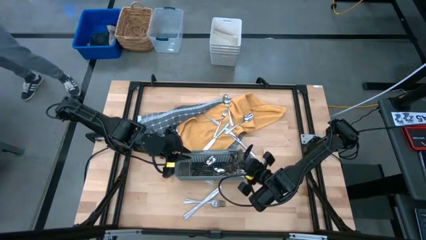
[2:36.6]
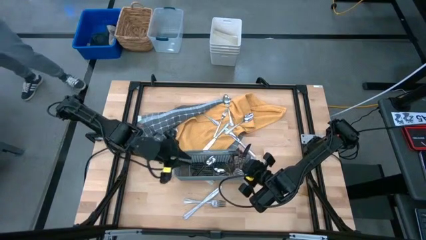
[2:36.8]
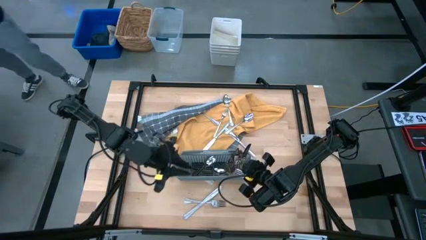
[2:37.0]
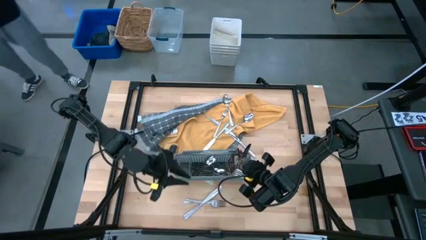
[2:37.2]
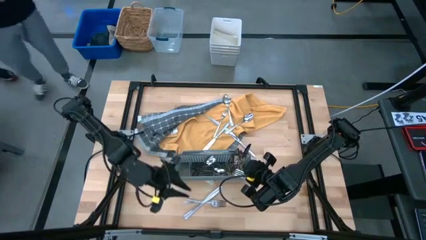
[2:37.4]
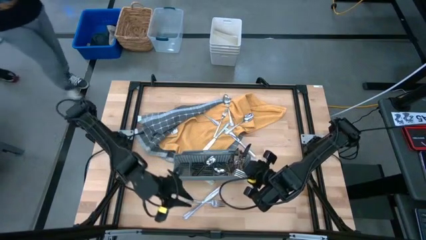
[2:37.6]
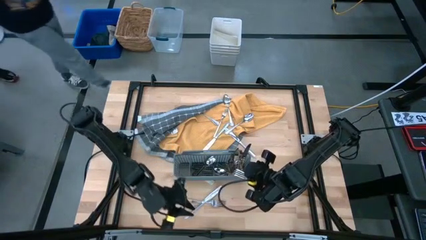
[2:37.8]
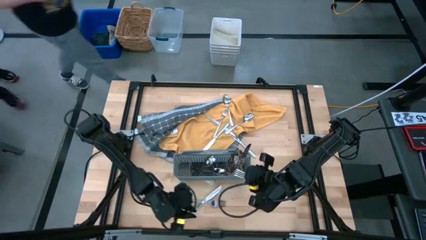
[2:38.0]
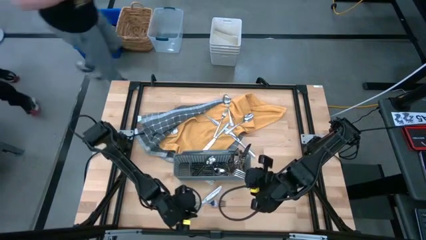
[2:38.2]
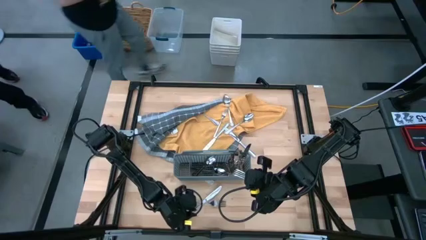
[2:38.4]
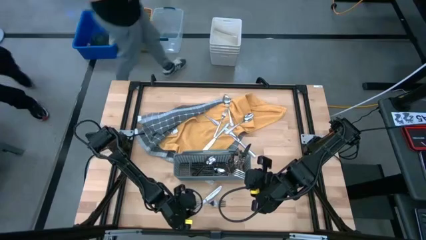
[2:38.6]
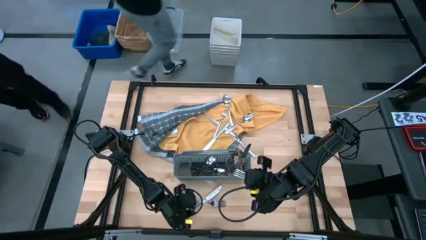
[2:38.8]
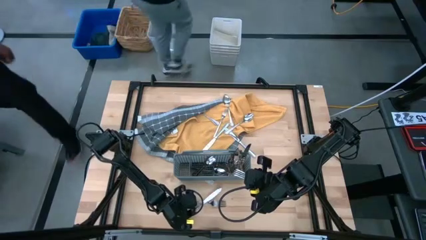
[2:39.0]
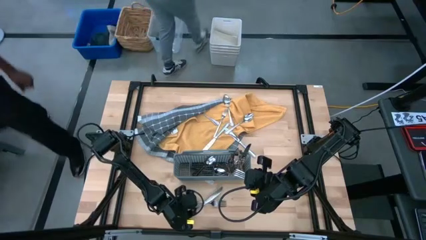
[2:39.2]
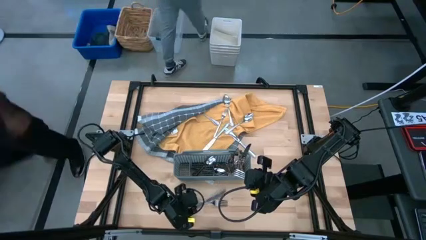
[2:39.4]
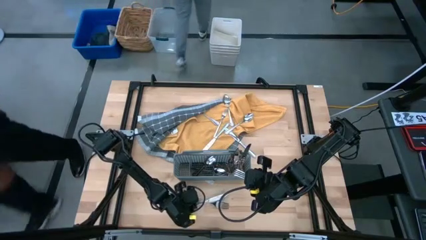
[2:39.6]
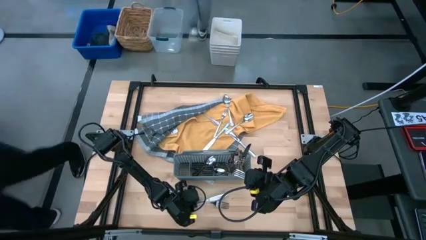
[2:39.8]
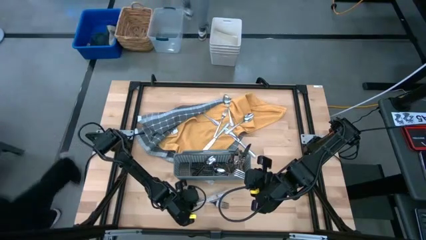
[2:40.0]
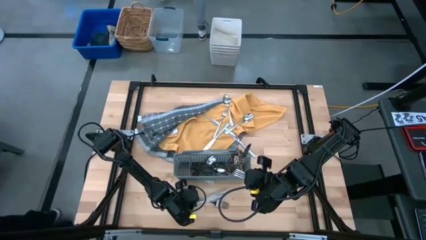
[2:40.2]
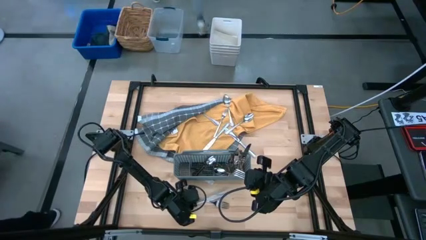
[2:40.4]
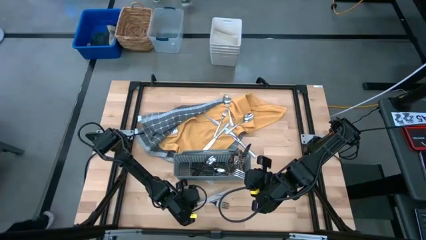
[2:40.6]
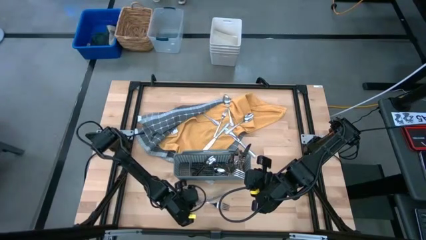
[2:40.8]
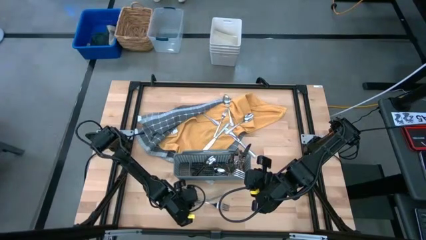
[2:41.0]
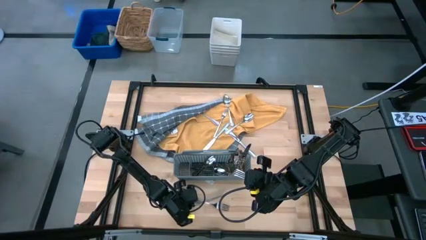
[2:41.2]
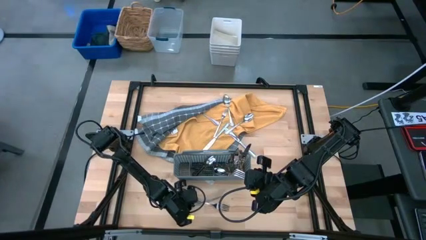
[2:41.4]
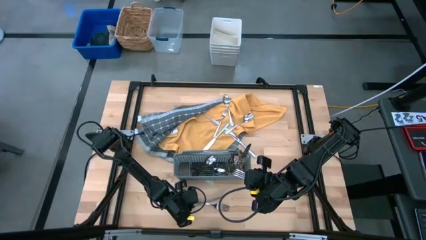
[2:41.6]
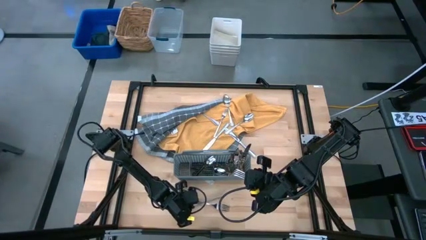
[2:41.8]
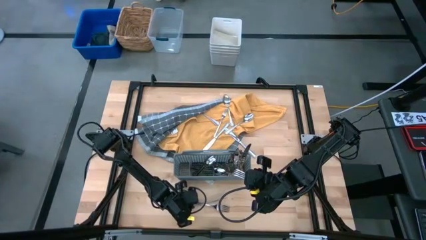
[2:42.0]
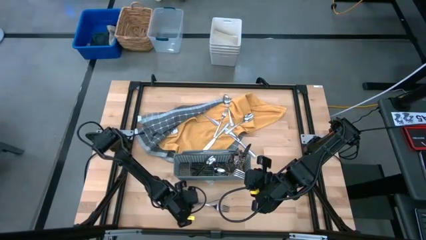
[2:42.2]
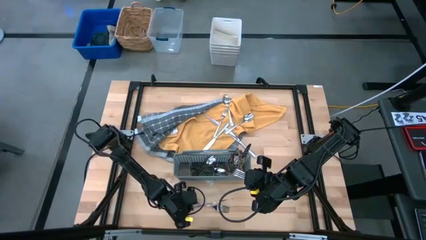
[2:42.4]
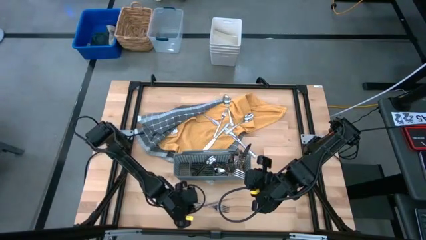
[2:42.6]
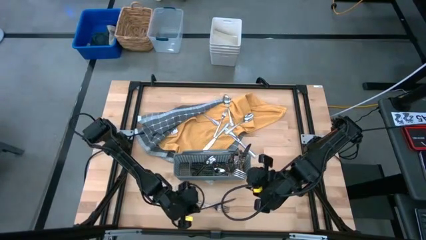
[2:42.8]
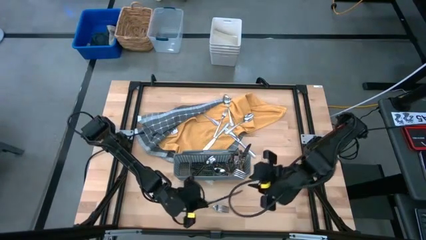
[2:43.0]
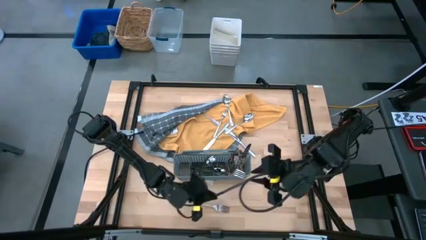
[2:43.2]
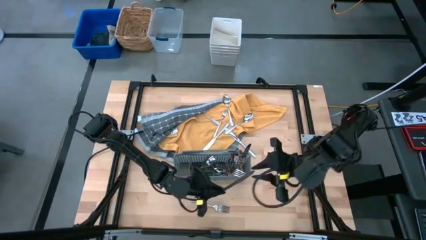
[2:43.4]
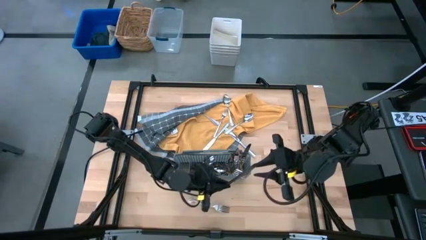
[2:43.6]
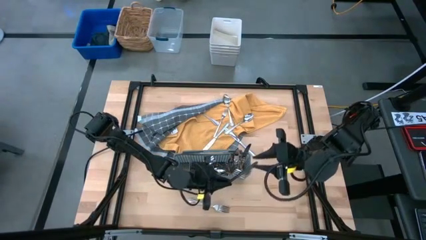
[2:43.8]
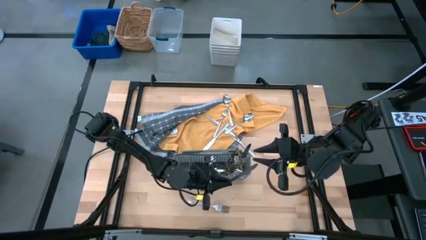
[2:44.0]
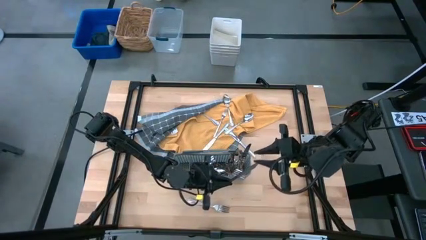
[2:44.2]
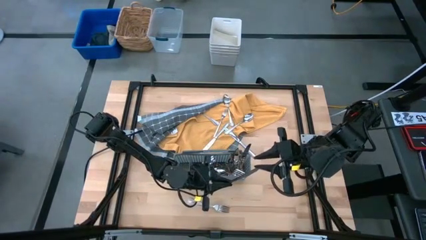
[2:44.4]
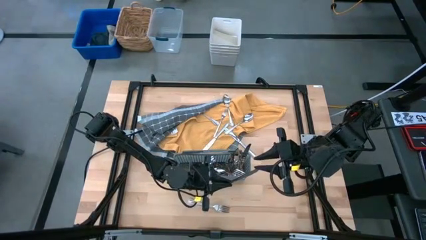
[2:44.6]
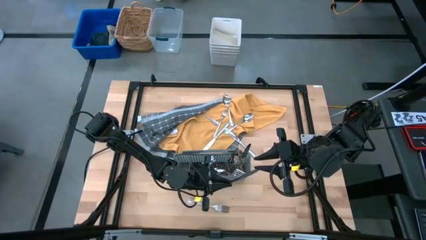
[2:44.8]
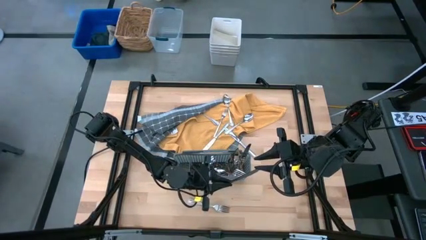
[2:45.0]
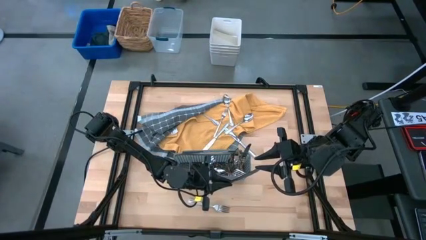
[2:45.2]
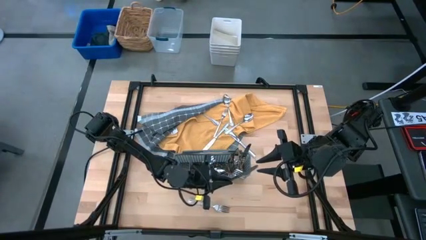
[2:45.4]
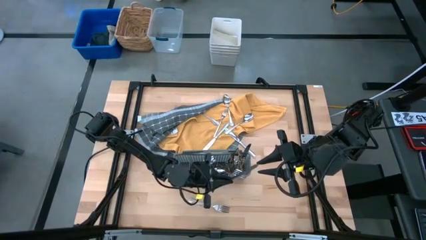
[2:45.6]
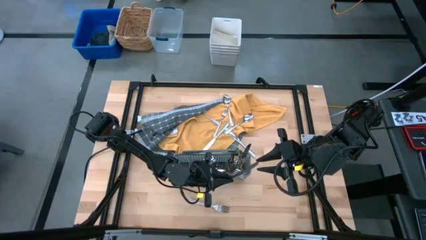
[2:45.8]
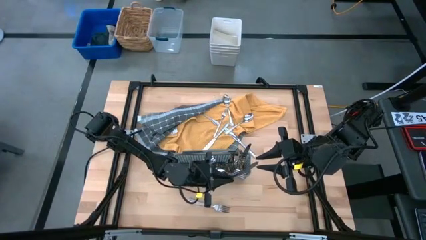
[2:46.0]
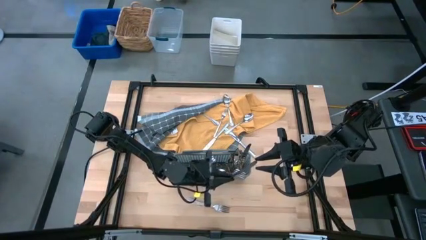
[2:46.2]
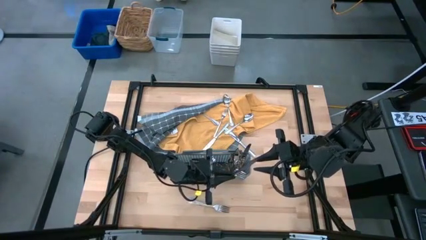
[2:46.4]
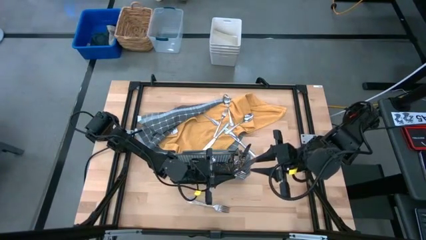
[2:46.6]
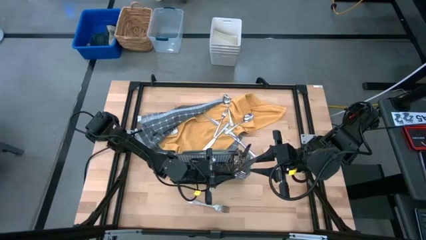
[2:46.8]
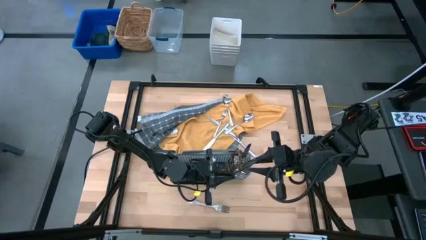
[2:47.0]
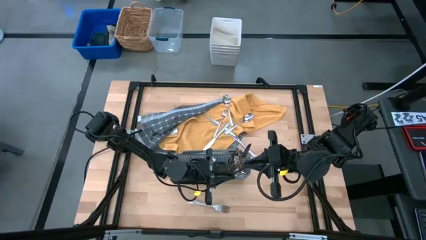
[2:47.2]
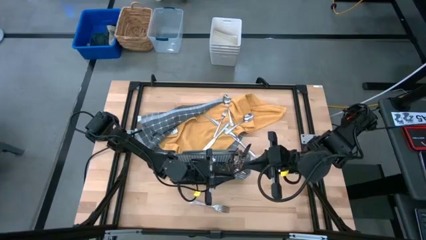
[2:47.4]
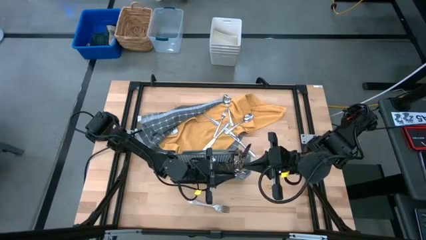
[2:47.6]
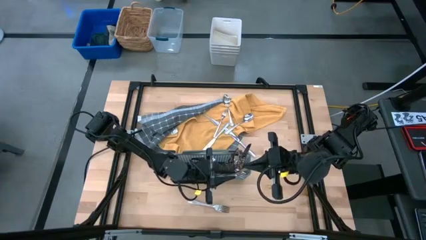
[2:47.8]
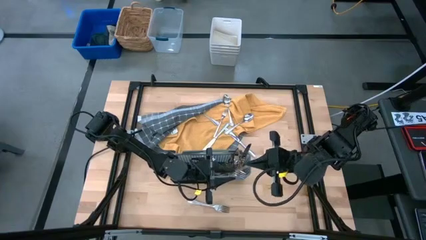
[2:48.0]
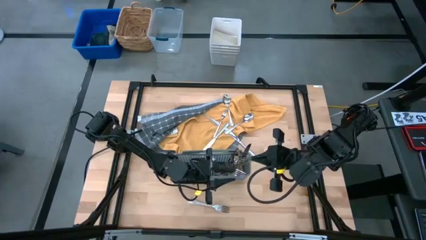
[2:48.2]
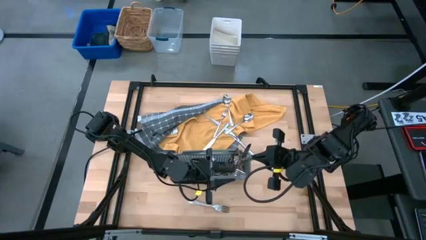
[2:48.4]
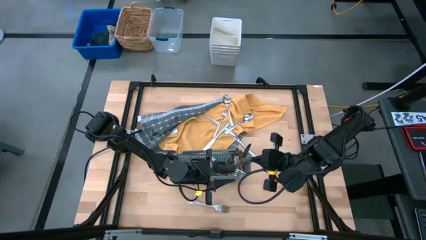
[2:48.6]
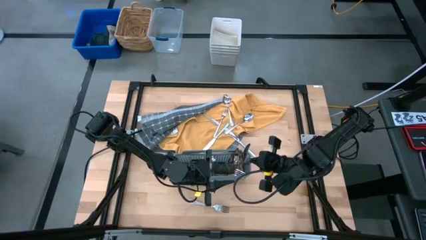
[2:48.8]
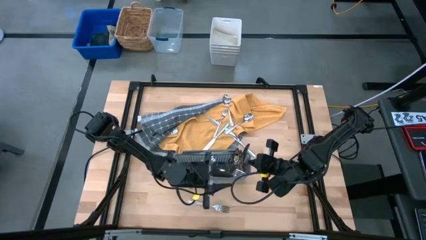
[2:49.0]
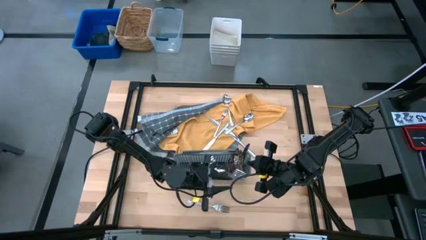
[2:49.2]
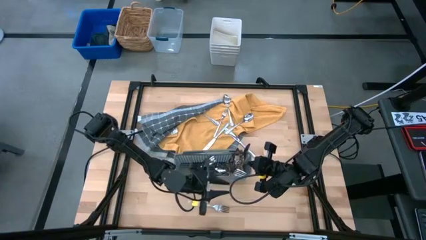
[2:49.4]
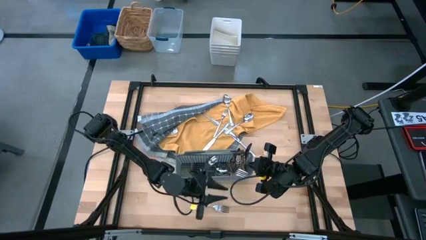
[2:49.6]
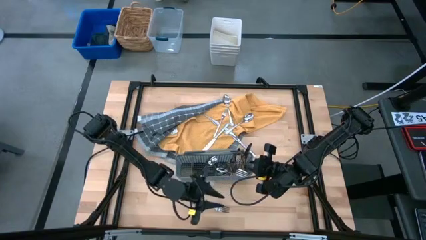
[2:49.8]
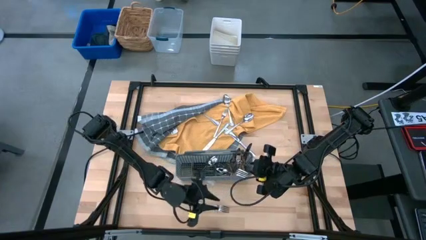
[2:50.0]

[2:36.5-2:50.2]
Task: Sort silverware
Put the silver knife into the gray silverware basket

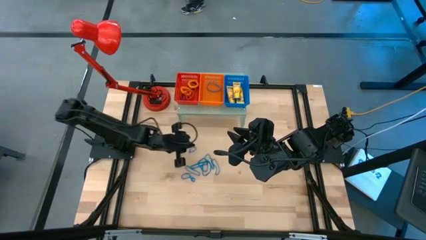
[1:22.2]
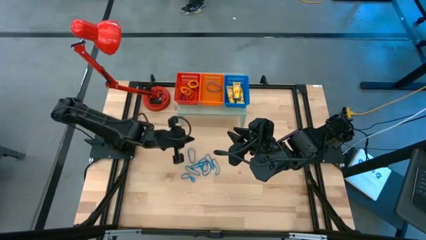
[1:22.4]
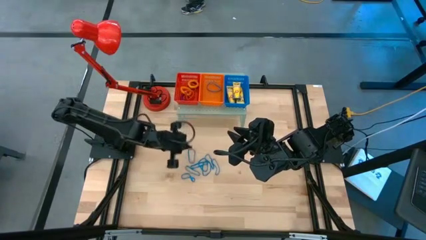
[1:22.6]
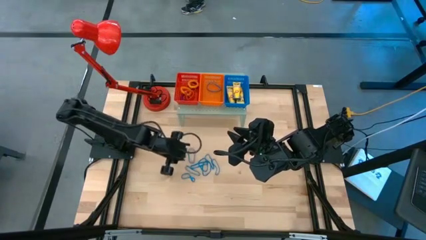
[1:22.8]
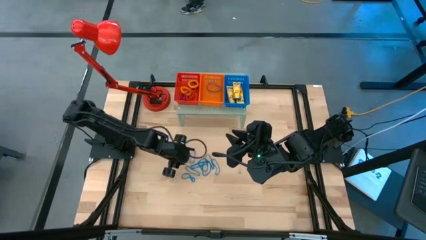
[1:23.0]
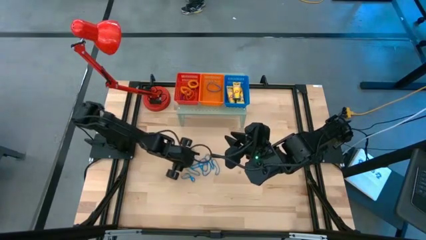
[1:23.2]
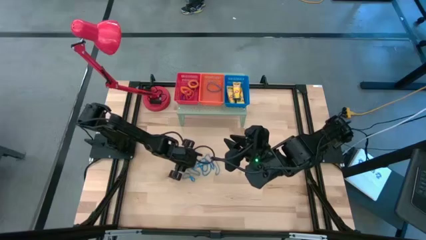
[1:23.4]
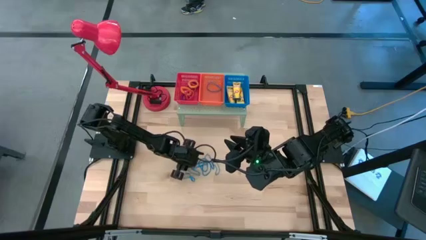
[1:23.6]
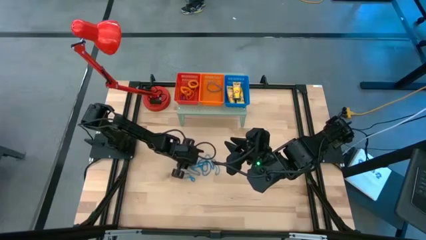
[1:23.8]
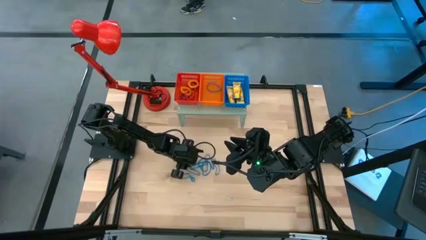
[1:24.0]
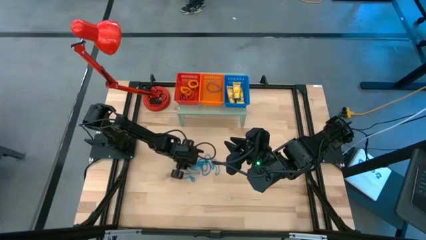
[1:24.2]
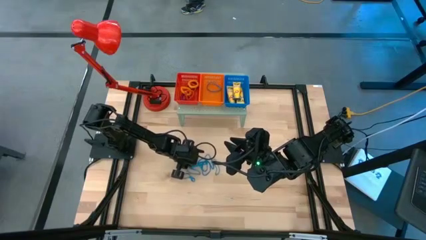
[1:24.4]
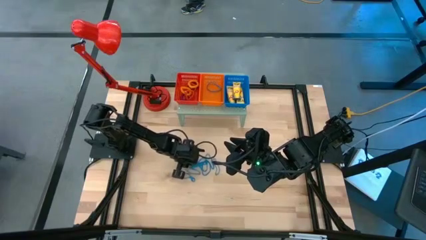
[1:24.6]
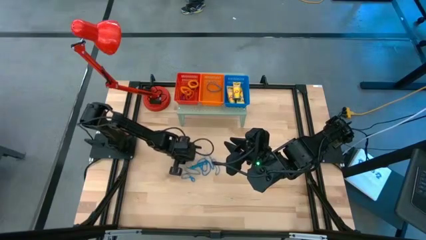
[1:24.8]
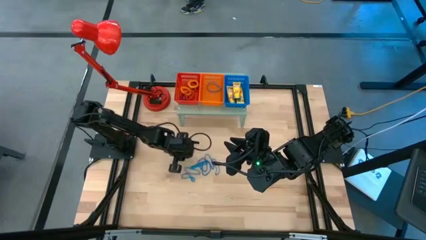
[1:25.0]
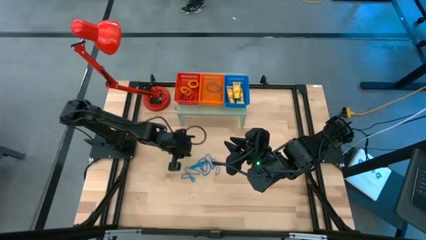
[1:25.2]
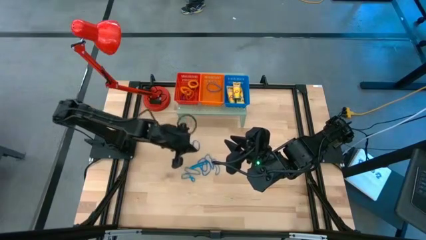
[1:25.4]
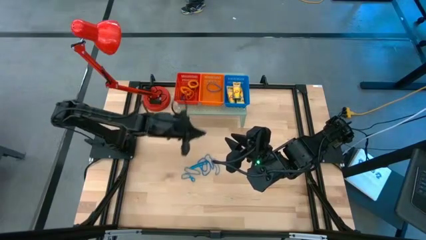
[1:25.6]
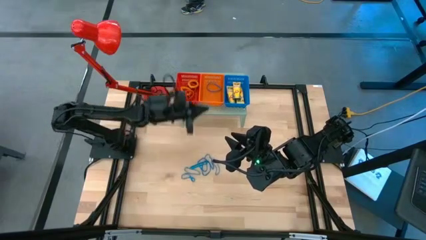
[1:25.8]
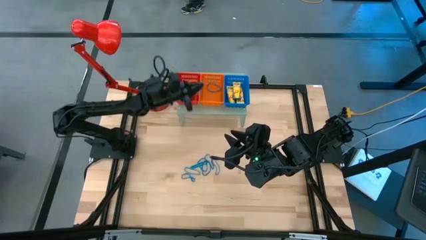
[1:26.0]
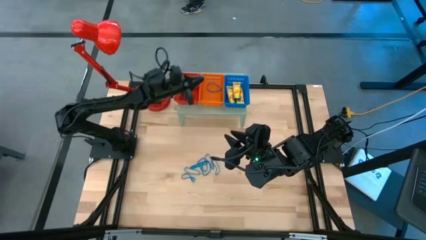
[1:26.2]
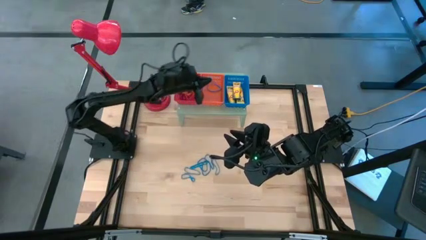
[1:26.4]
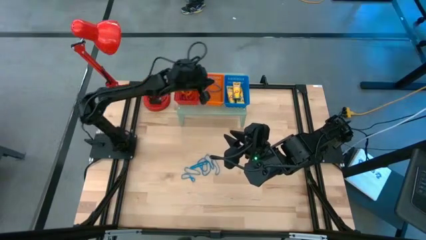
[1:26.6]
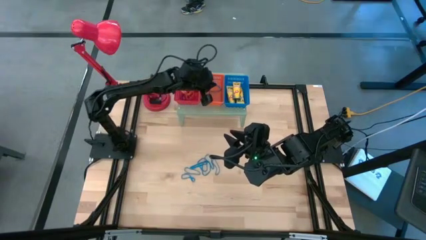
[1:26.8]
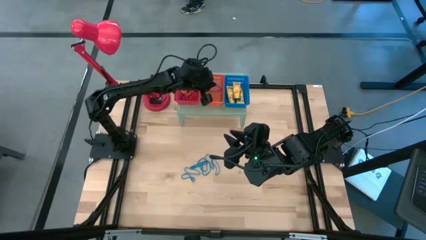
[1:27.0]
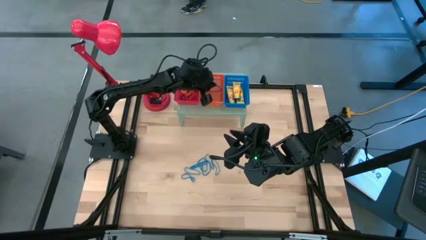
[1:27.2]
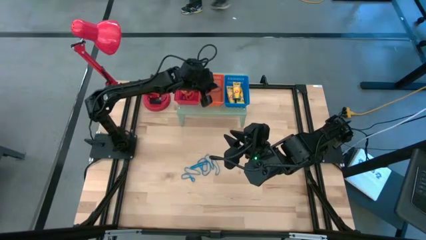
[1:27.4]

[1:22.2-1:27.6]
Task: Pick & Place Office Desk Supplies
Put the blue rubber band into the orange bin on the shelf
